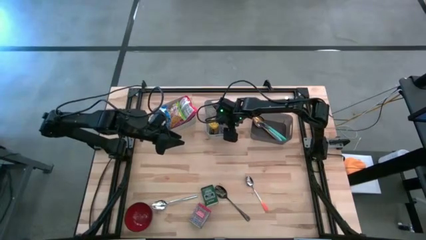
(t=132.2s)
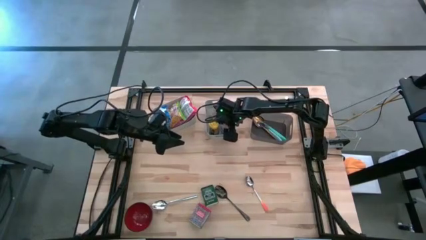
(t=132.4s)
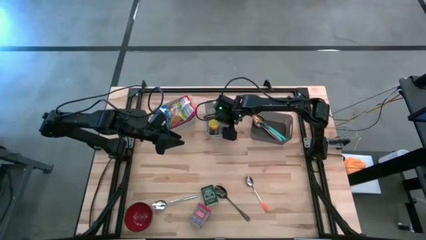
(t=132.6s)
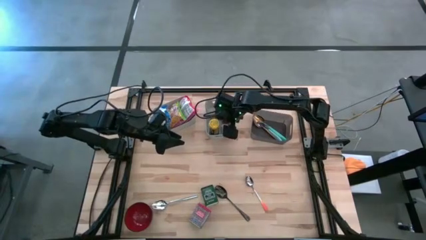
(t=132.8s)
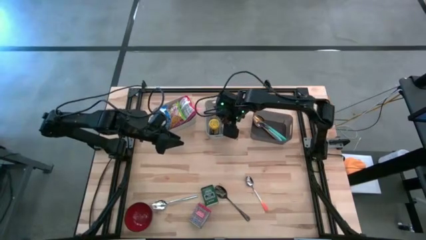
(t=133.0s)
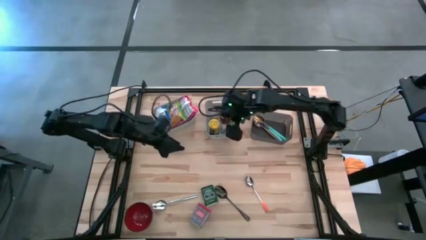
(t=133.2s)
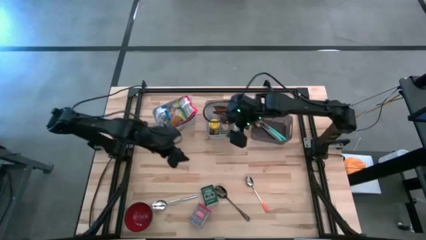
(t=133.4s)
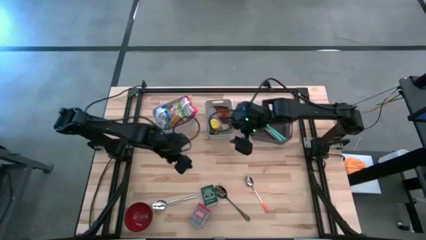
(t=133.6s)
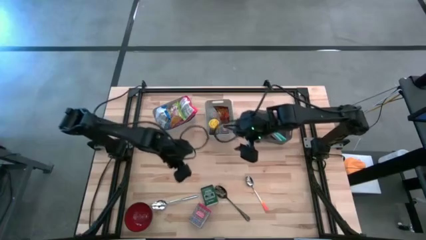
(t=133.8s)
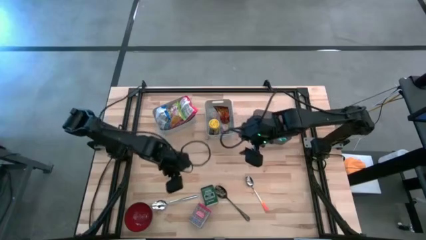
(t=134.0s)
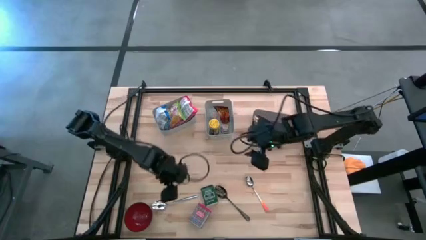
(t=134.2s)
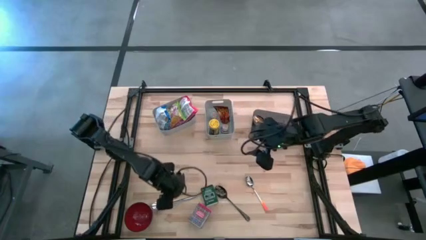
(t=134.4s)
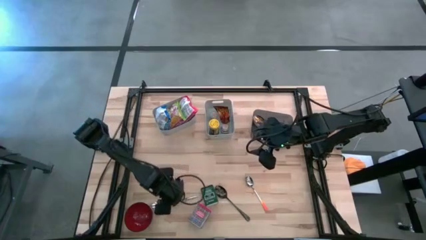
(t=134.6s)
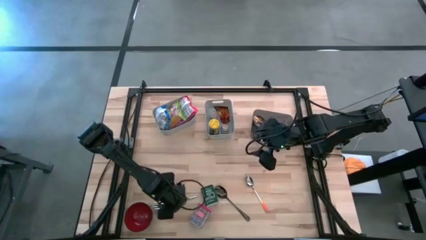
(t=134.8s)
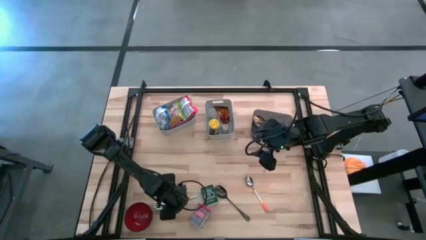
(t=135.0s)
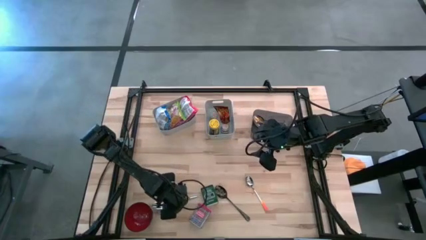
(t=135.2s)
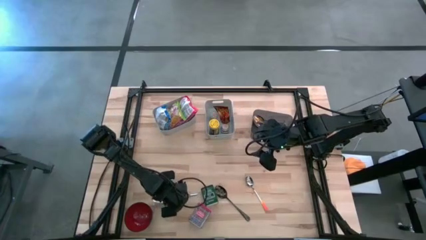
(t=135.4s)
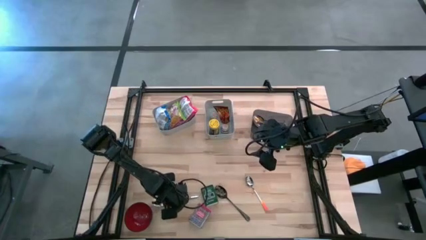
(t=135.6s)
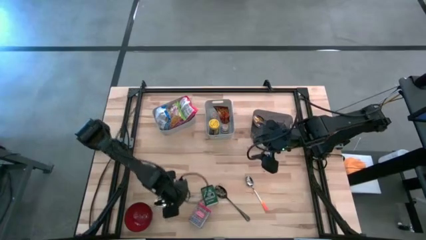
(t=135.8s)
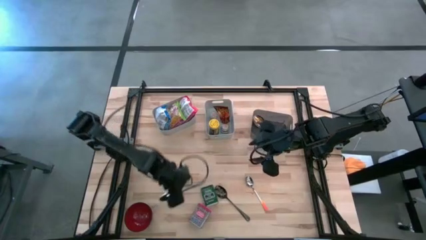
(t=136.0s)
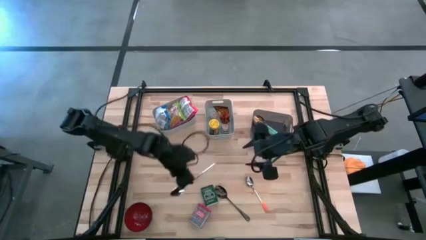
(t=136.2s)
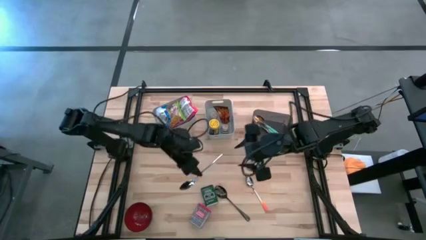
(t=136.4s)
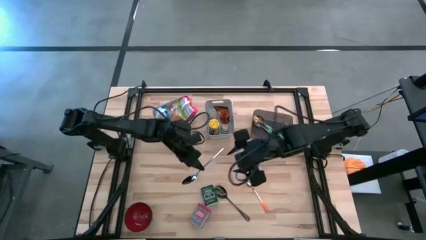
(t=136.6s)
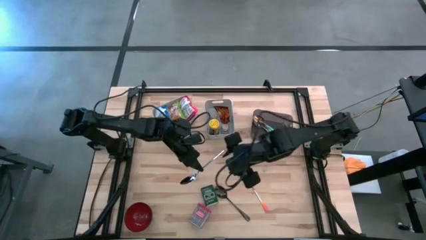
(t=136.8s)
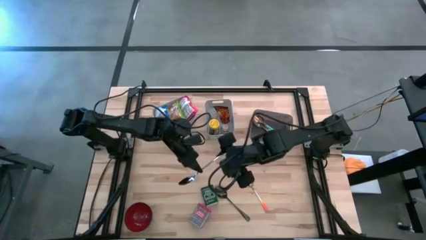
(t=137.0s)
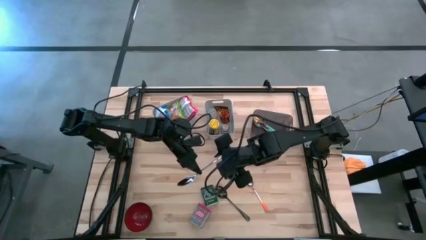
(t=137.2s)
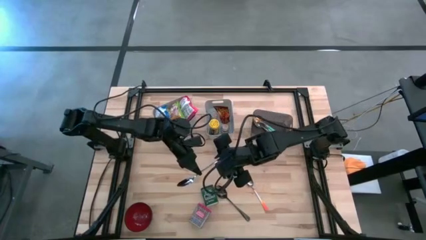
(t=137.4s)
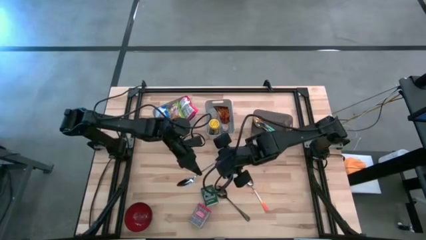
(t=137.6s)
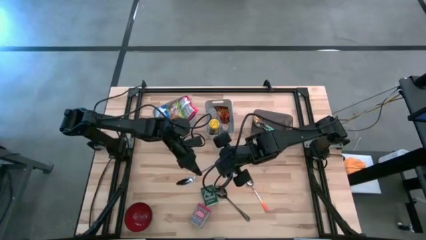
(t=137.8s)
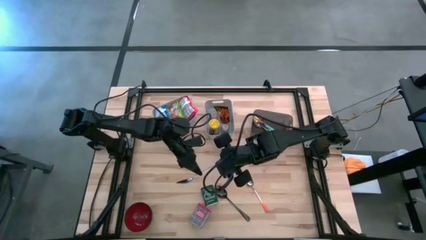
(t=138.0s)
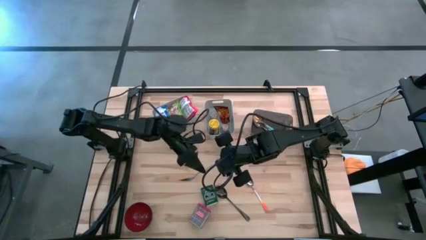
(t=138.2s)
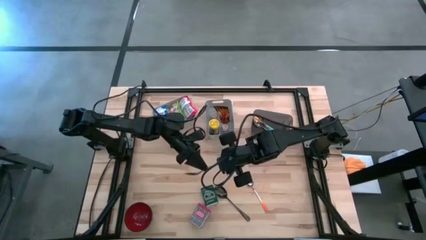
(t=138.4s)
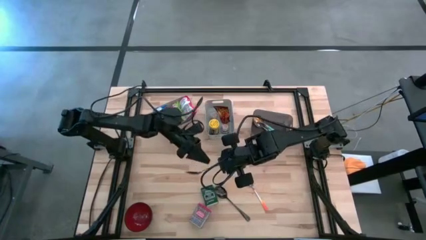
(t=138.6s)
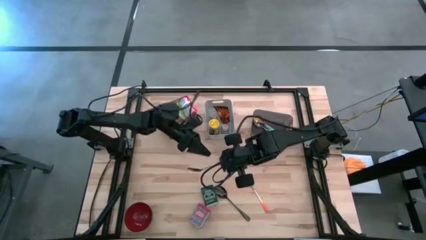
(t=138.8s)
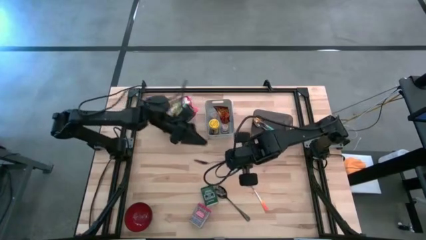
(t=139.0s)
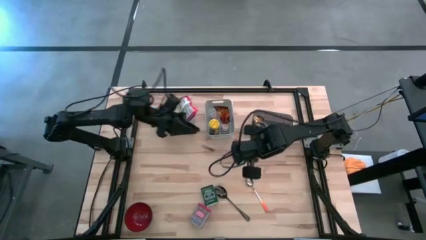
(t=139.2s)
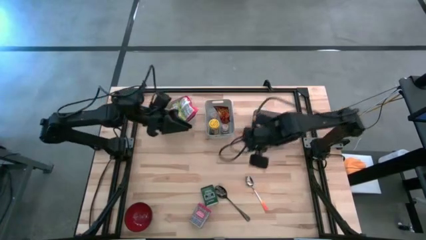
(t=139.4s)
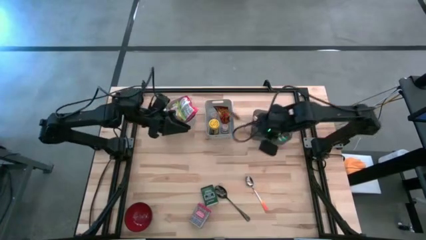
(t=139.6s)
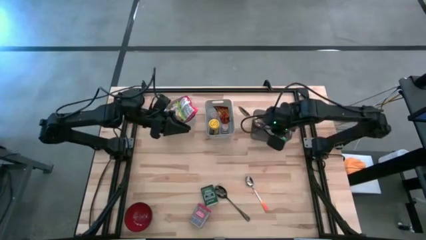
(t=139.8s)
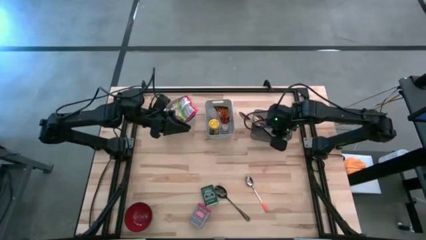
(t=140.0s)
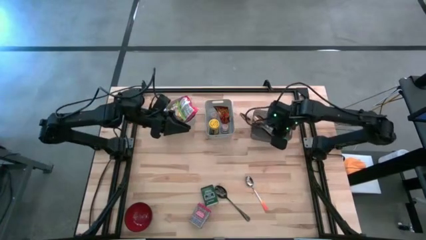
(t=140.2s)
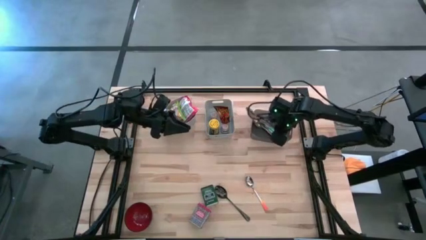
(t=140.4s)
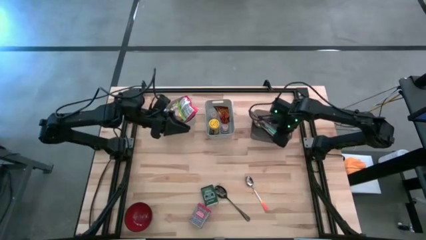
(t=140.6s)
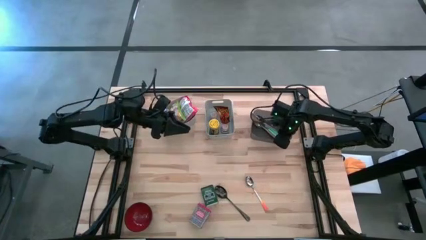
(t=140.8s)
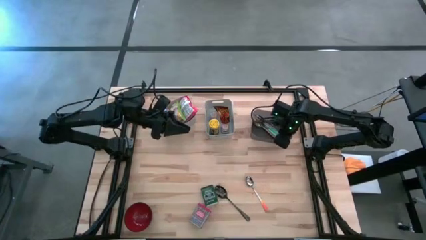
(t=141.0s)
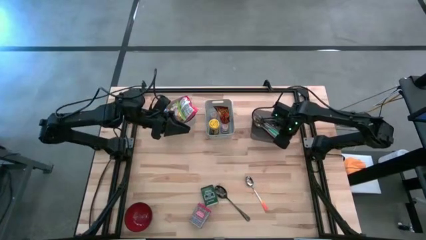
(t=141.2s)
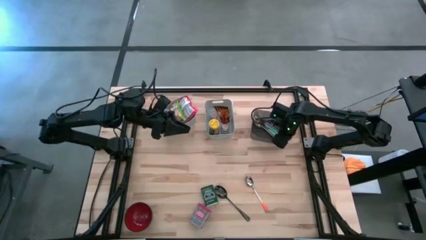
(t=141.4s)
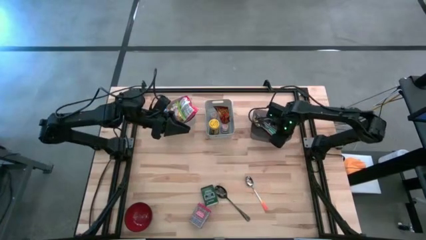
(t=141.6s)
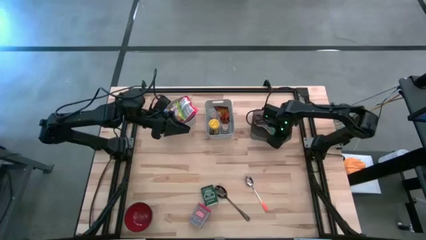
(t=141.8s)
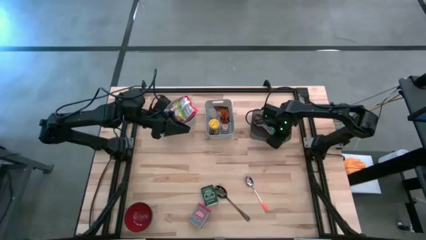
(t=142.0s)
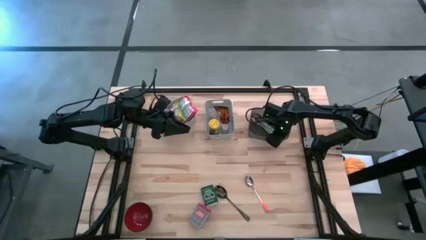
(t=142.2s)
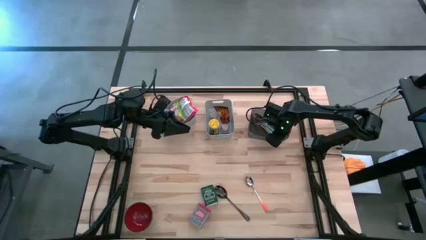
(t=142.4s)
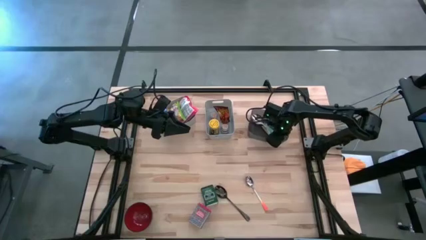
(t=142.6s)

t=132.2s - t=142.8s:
Put the silver spoon into the black bin

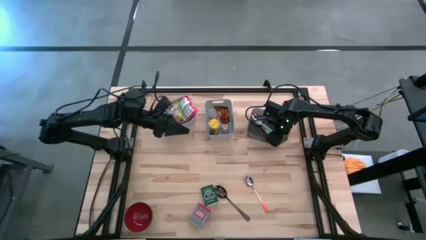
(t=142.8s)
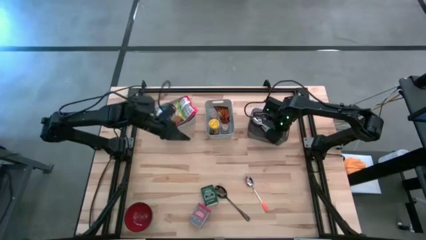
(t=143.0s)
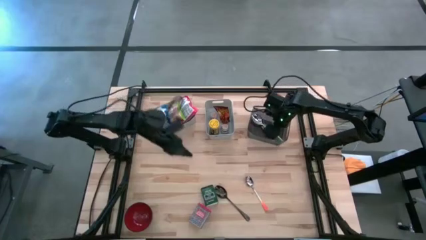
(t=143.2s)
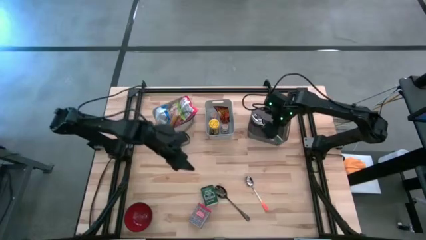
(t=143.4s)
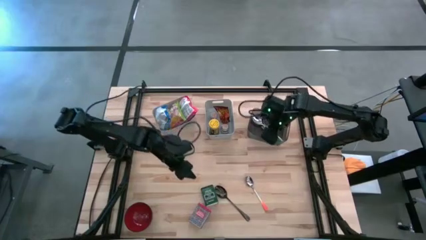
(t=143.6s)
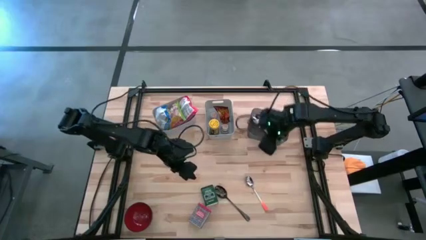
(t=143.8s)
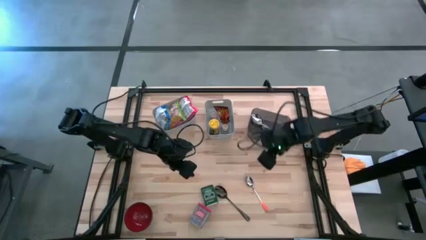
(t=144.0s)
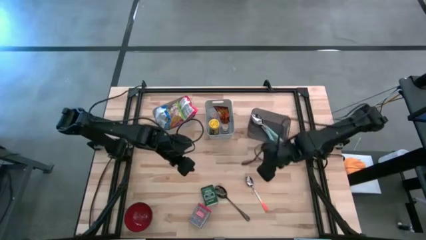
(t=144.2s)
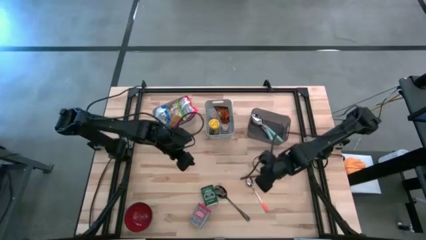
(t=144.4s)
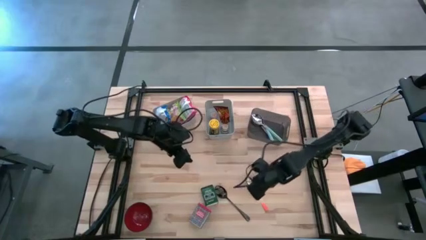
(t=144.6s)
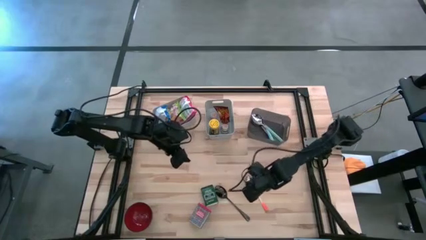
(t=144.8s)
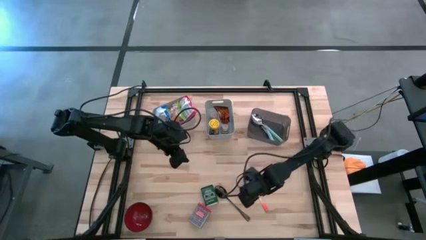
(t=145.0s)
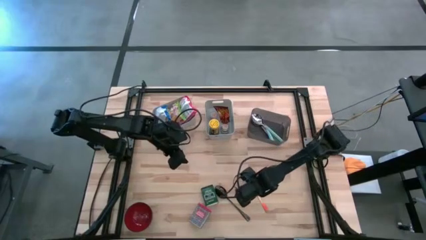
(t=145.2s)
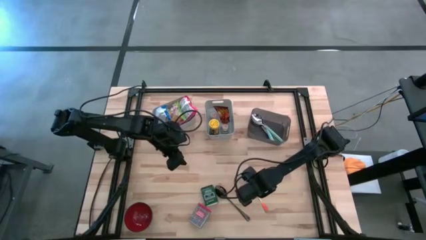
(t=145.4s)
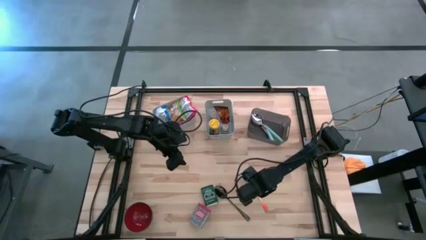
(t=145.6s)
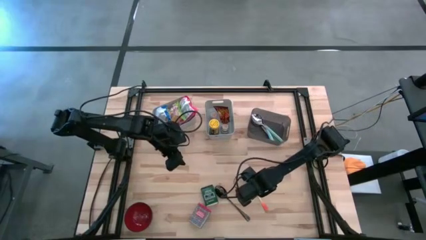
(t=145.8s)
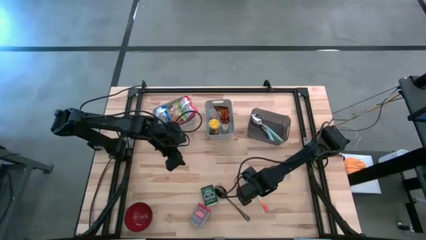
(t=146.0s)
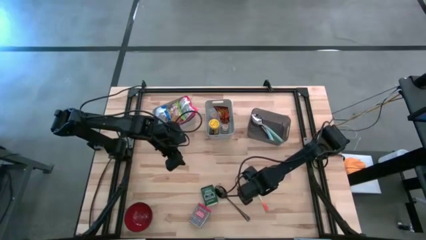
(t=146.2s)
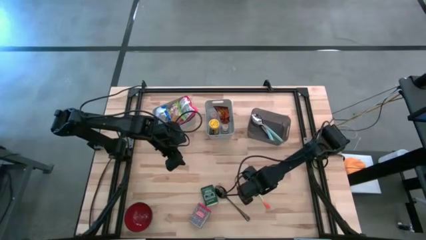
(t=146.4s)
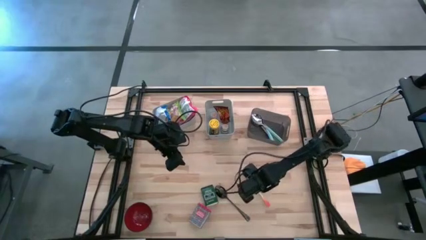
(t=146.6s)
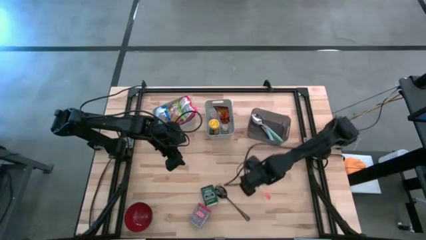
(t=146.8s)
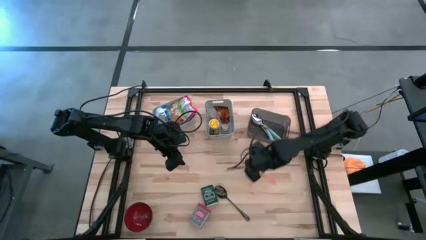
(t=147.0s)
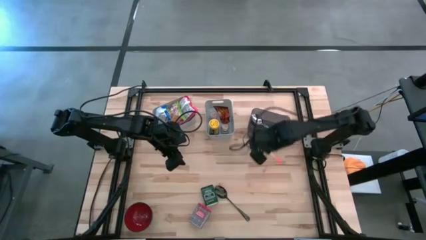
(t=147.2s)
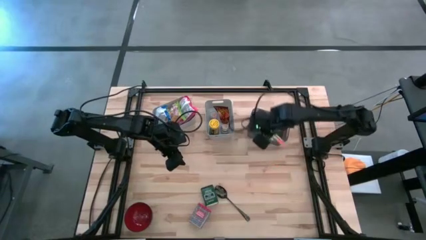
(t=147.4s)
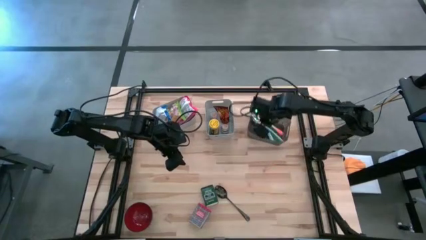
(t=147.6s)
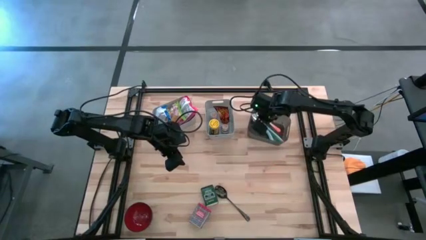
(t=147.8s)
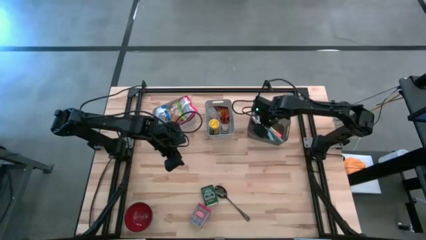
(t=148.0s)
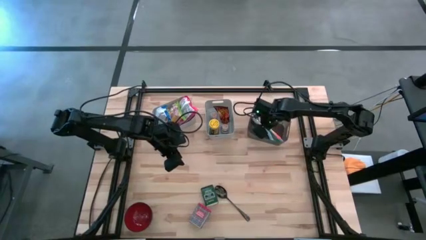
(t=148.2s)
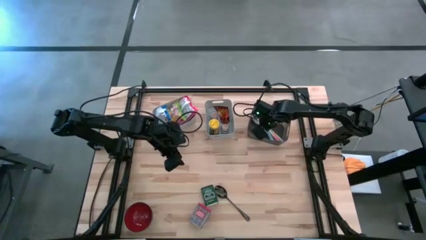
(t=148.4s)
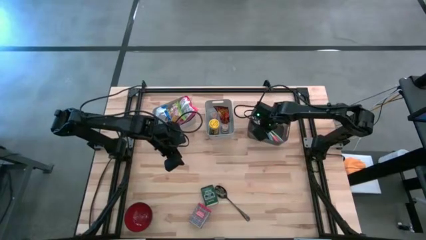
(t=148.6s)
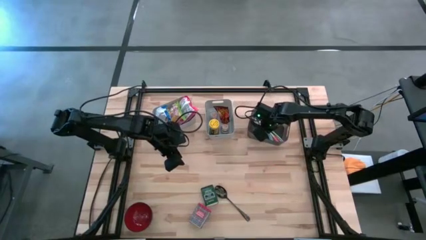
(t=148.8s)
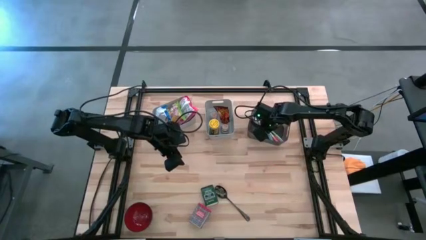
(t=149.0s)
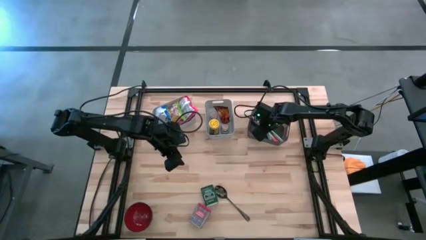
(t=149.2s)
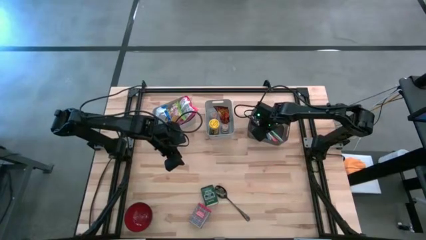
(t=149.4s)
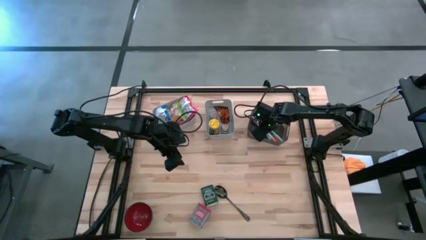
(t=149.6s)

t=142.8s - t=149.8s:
Put the orange spoon into the black bin
